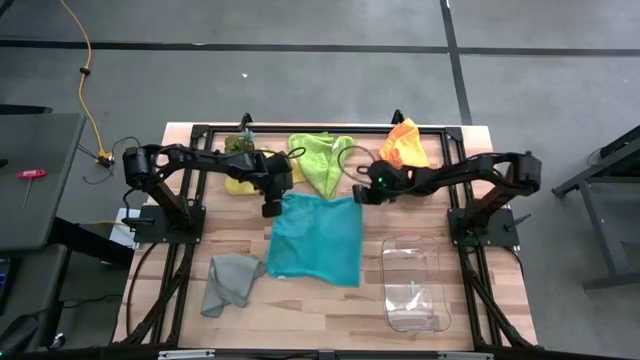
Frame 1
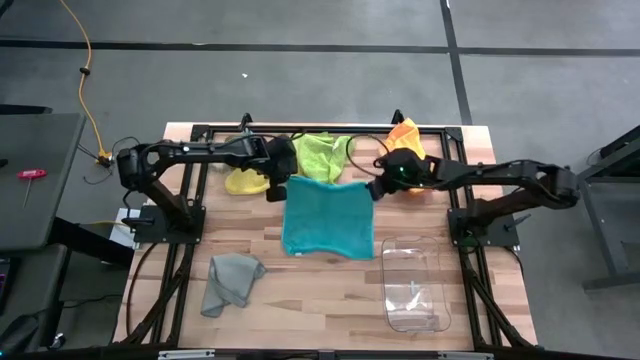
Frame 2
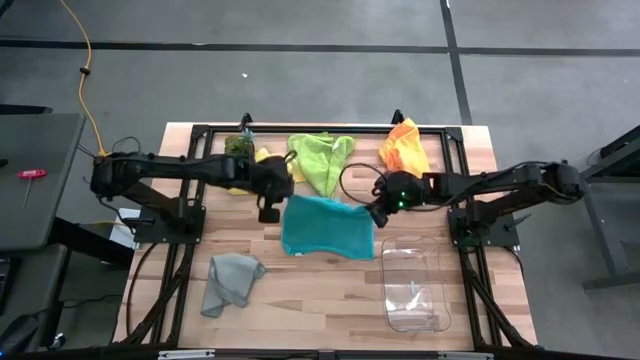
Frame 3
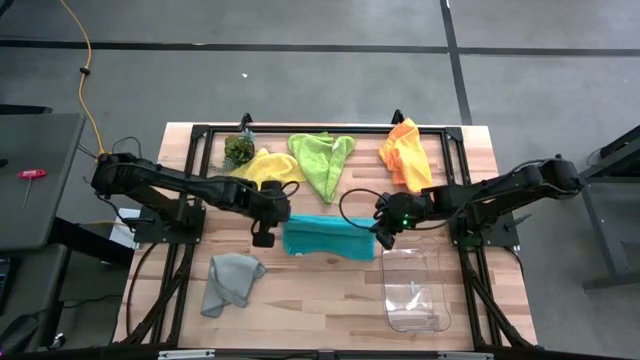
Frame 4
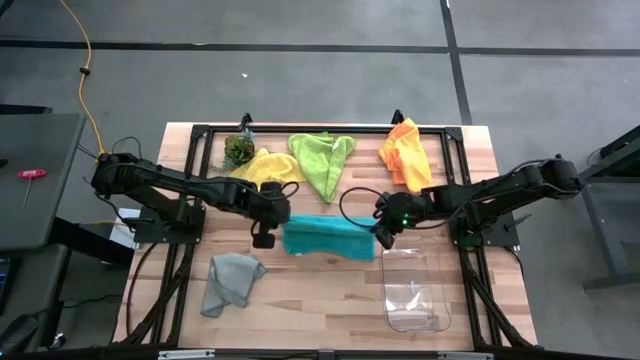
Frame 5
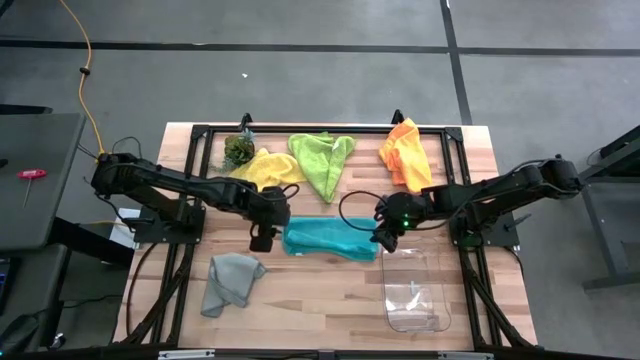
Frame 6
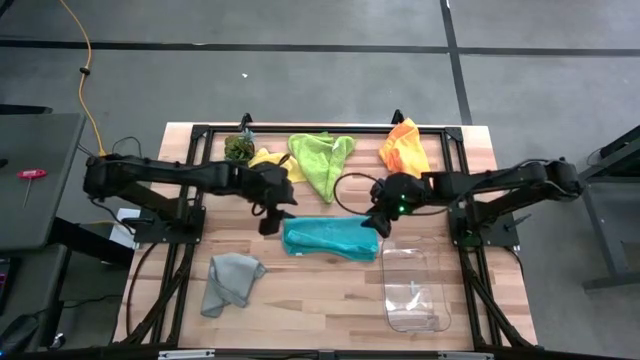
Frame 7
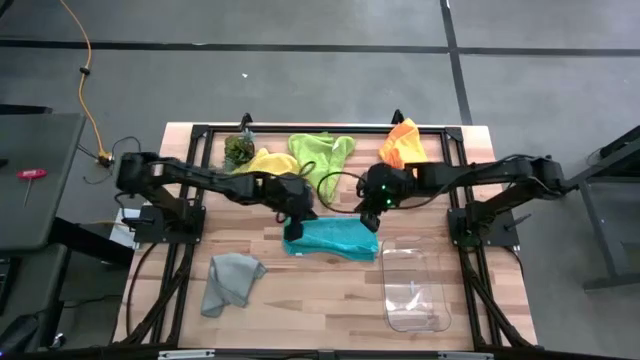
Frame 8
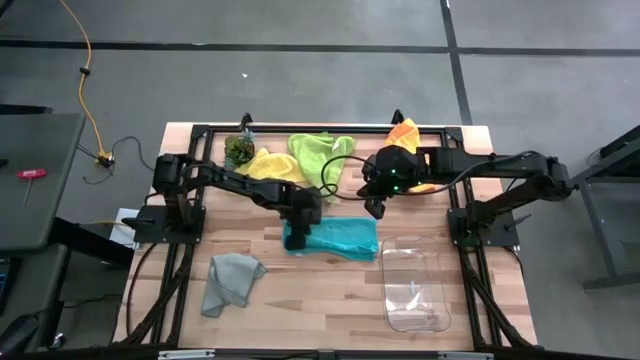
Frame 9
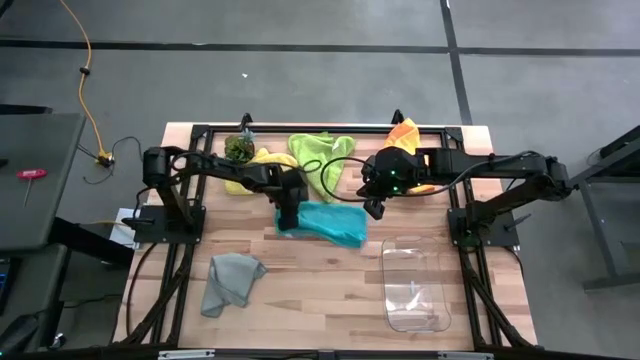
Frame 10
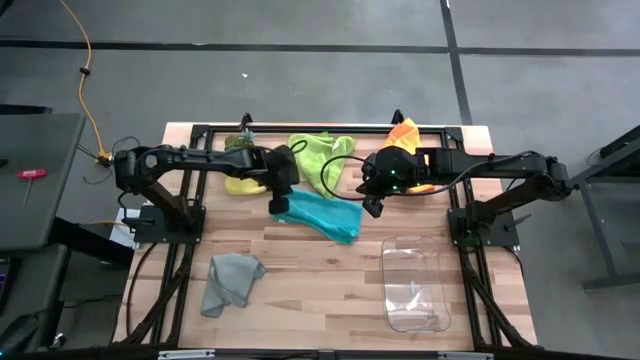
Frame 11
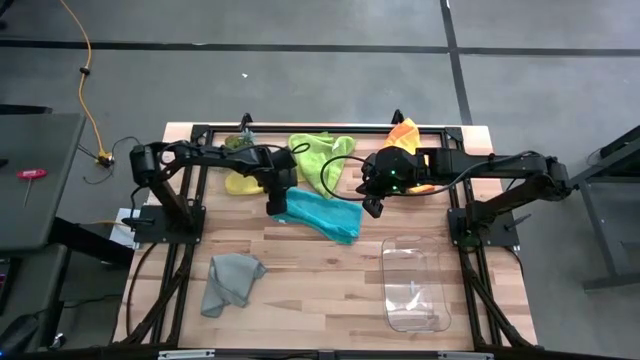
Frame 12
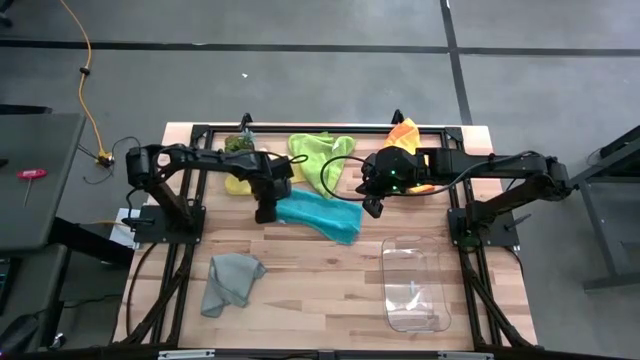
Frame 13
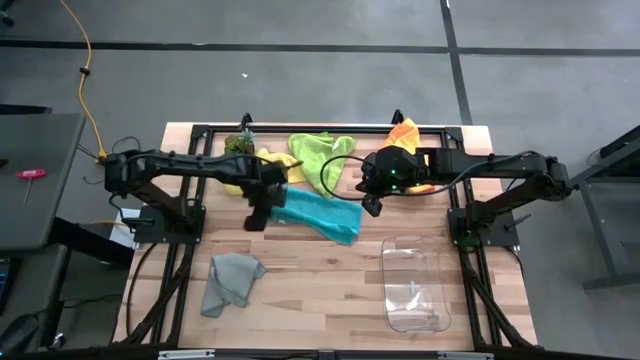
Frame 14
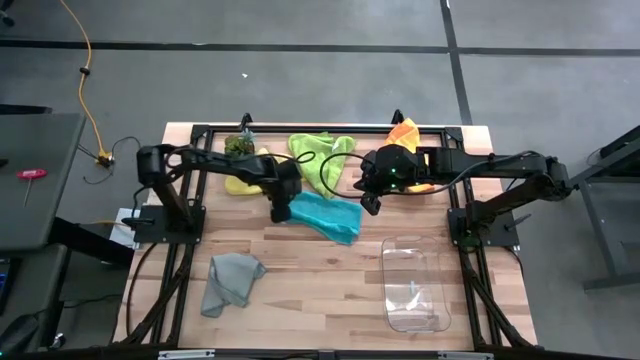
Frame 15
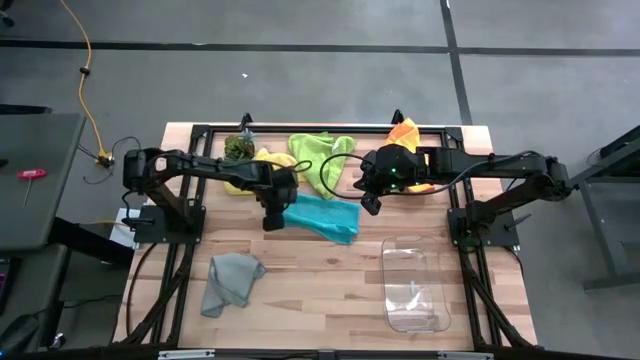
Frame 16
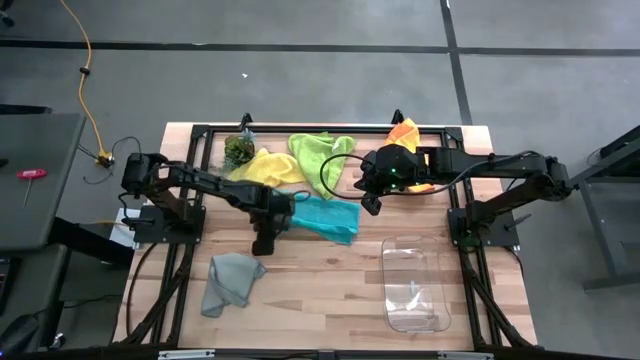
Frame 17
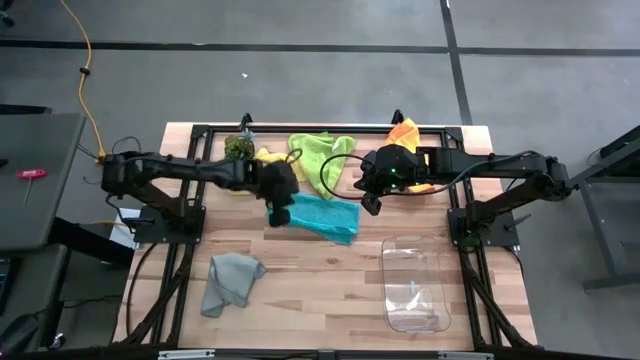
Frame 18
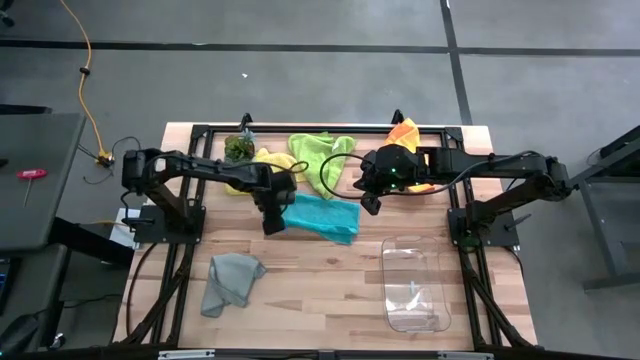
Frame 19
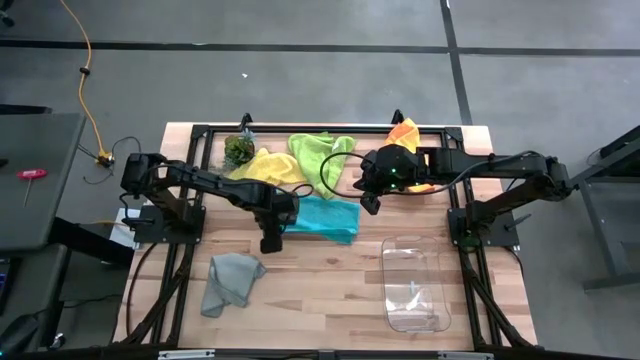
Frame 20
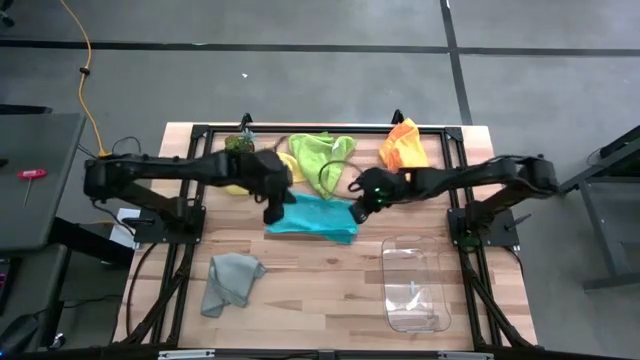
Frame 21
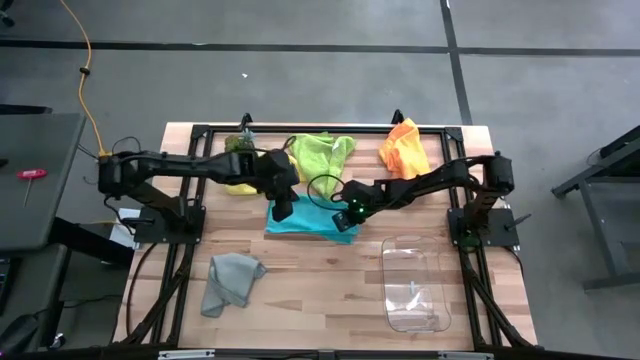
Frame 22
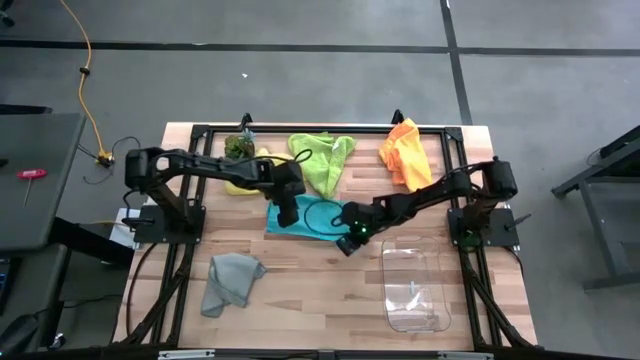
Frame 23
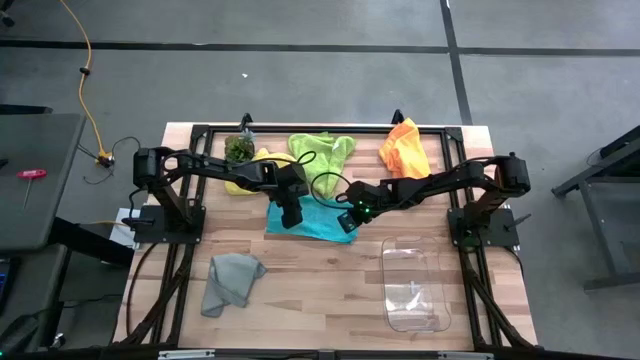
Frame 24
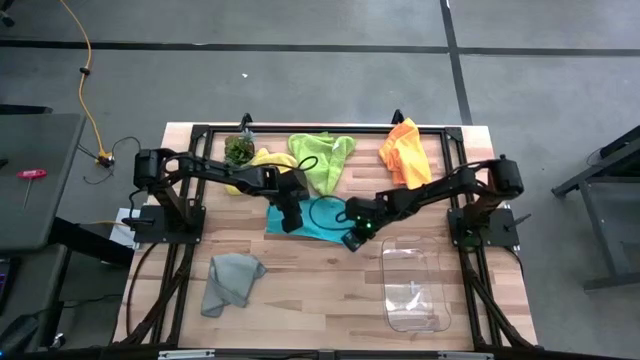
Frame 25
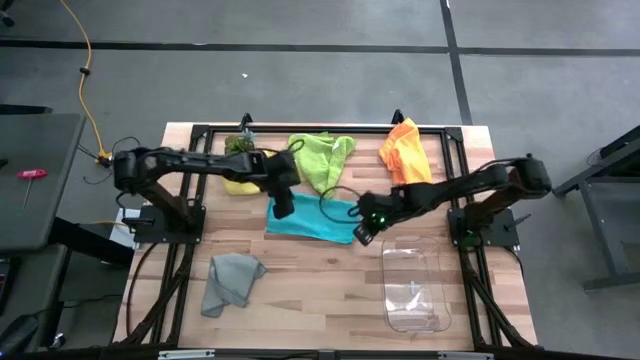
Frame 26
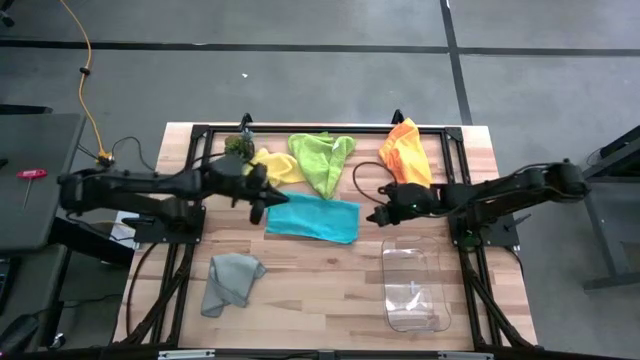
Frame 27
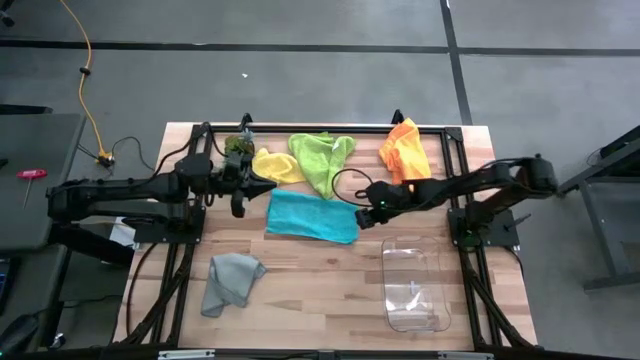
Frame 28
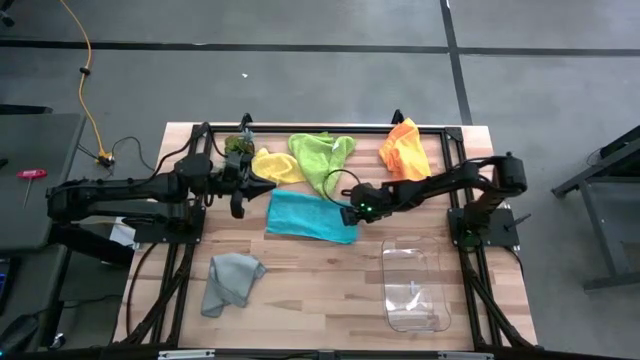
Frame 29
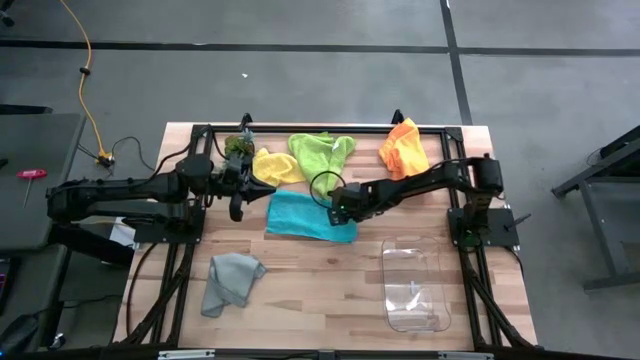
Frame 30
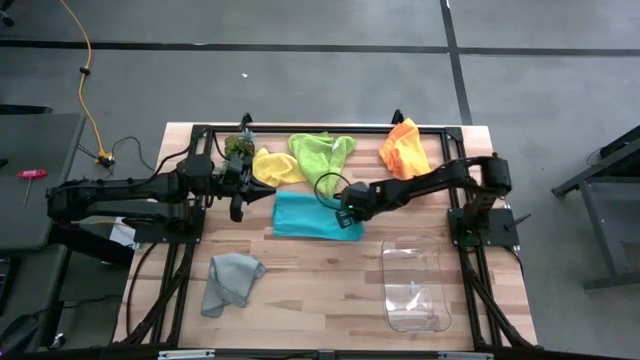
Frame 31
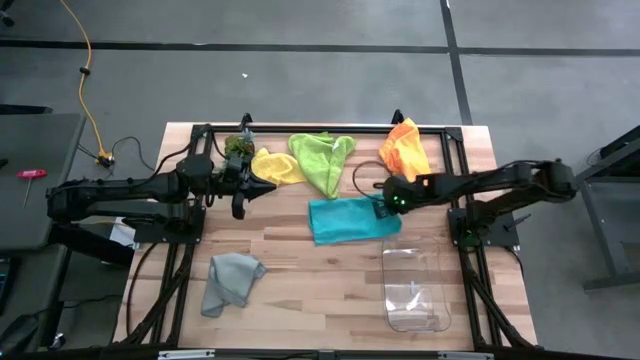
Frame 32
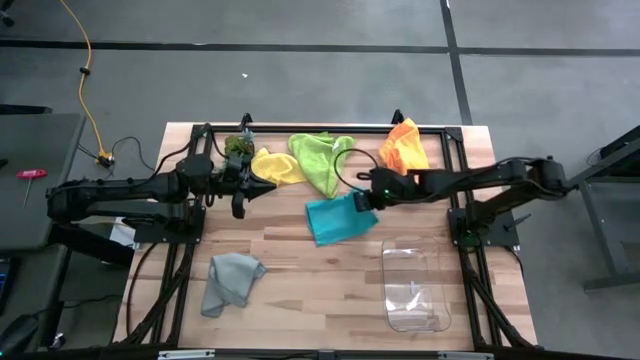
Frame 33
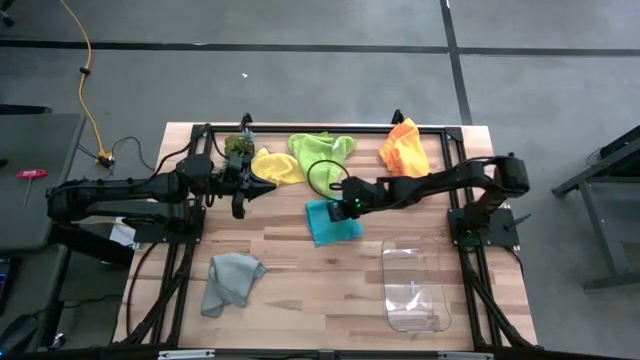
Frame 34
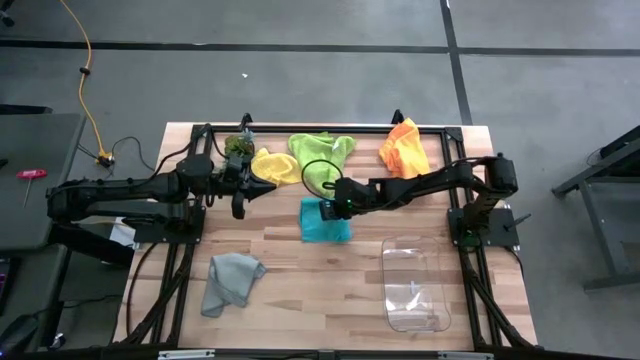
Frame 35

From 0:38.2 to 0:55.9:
Task: Fold microfiber towels
Fold the blue microfiber cloth

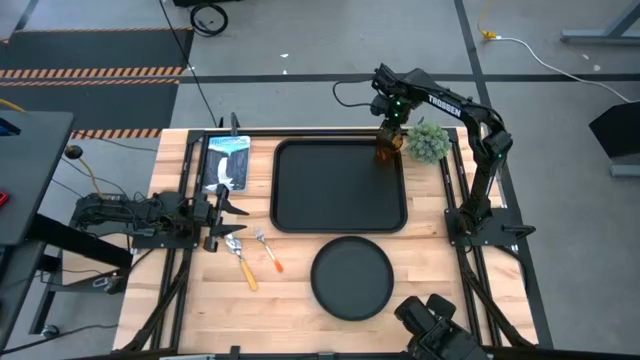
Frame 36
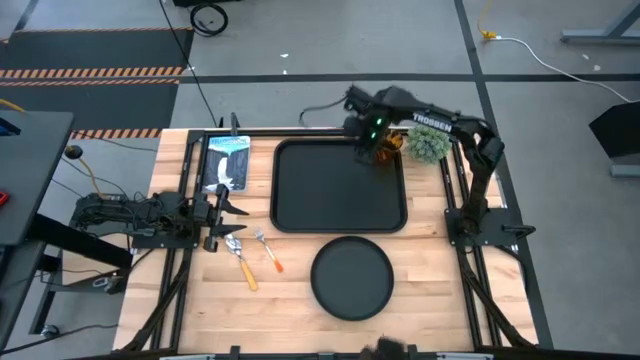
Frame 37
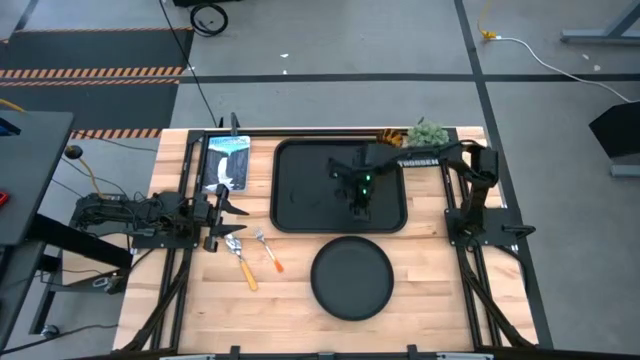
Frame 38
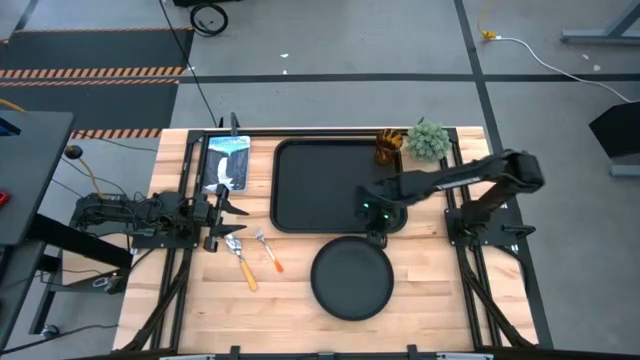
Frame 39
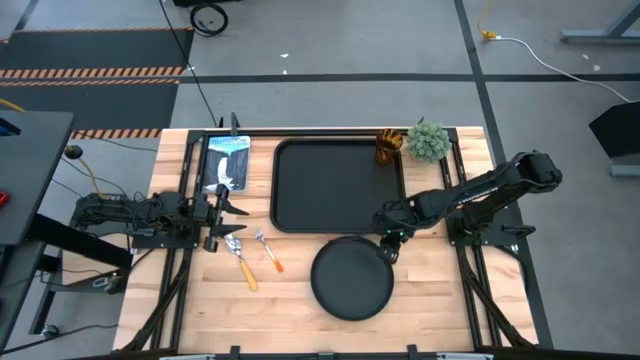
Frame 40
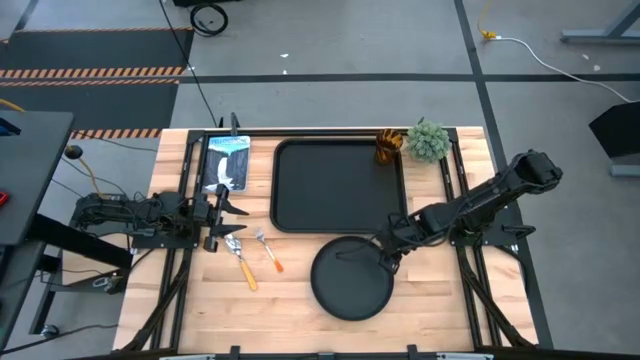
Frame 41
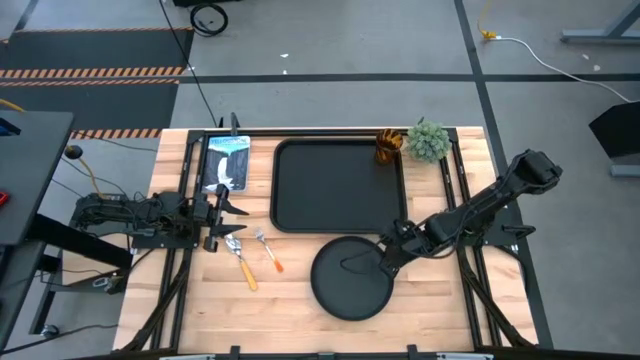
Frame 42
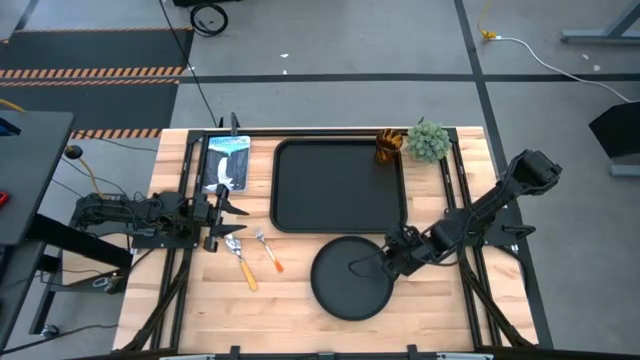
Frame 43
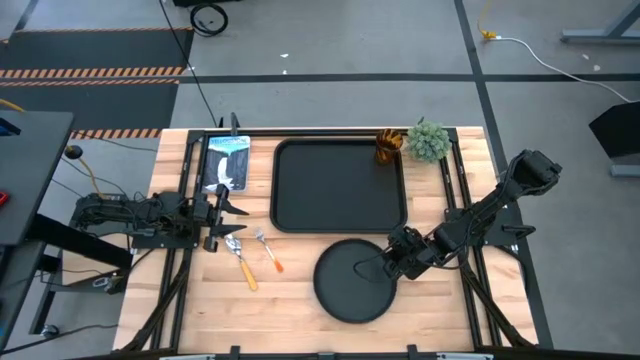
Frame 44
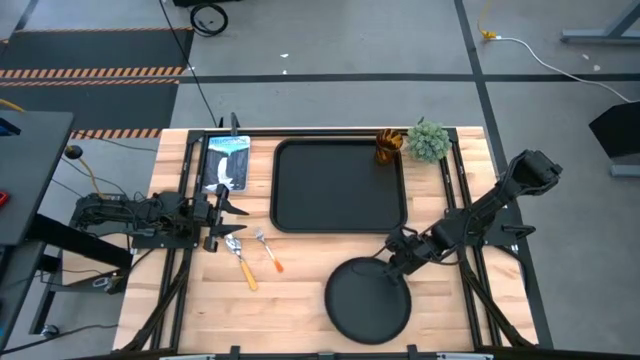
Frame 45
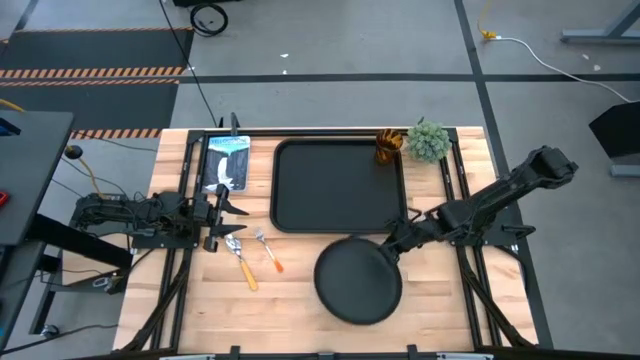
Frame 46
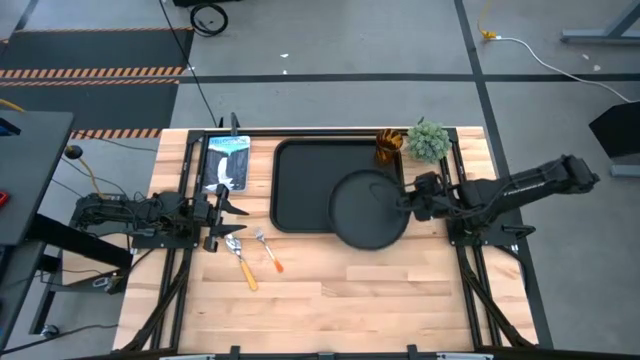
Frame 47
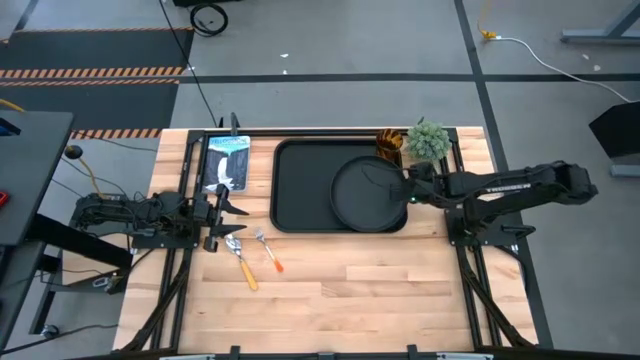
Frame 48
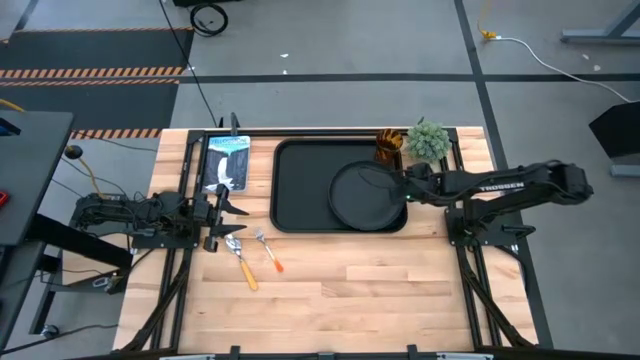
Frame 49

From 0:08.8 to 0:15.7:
Task: Pick and place plate/cup/fork/spoon on tray
Put the black plate on the black tray below the brown cup
